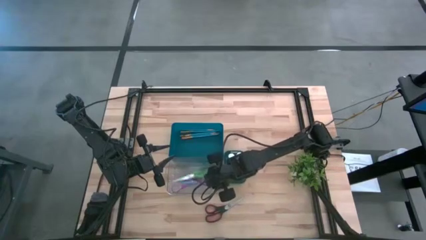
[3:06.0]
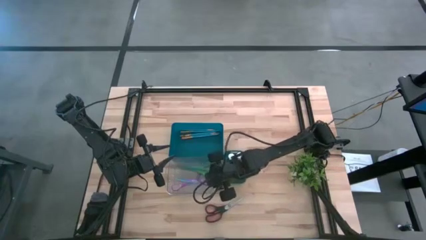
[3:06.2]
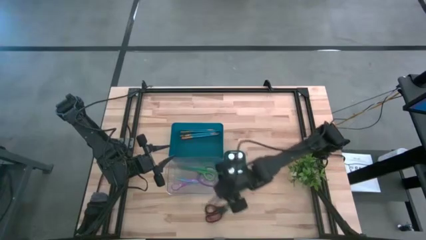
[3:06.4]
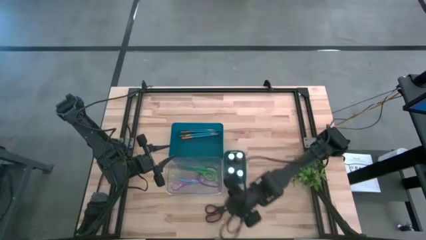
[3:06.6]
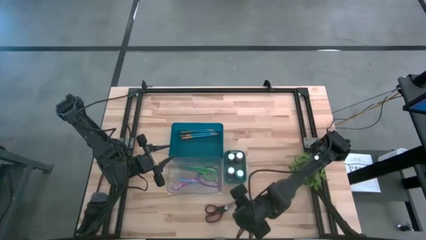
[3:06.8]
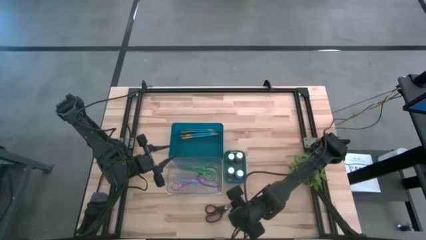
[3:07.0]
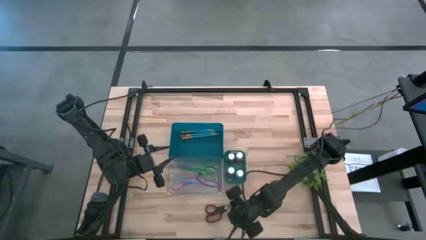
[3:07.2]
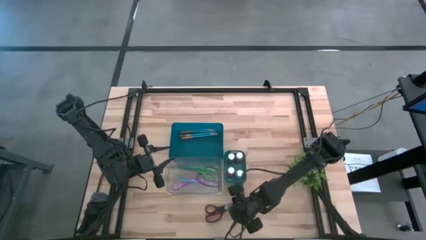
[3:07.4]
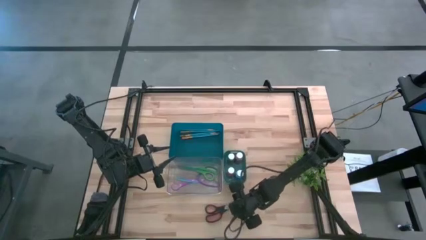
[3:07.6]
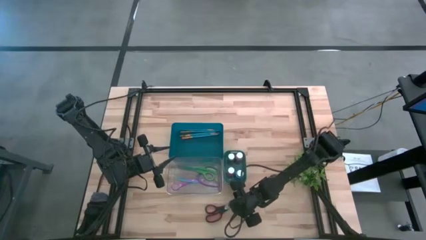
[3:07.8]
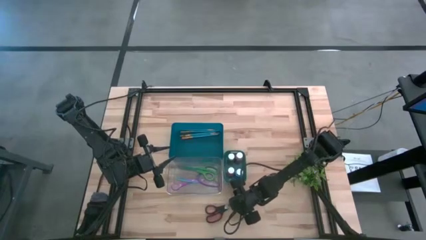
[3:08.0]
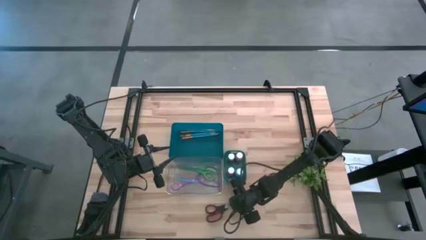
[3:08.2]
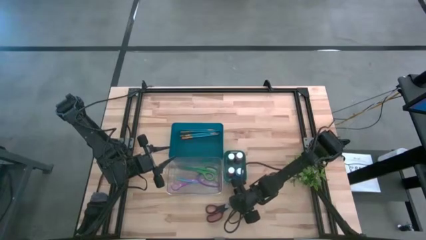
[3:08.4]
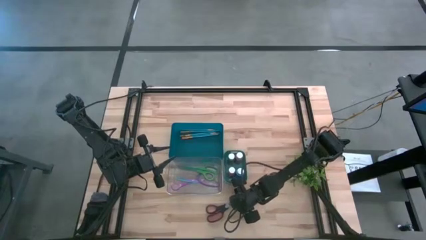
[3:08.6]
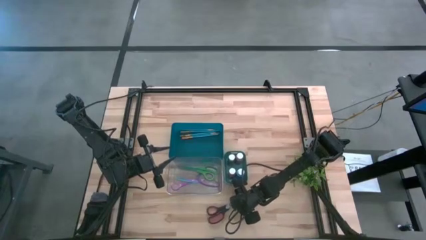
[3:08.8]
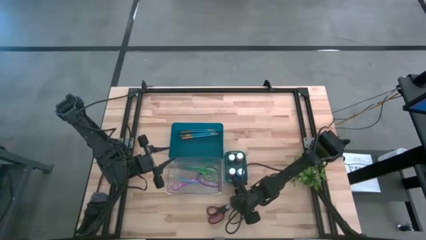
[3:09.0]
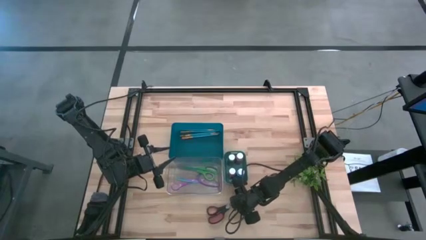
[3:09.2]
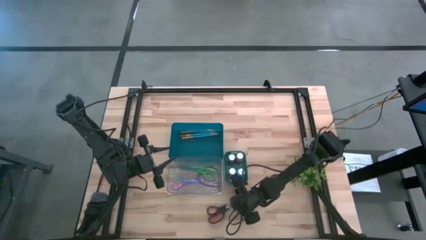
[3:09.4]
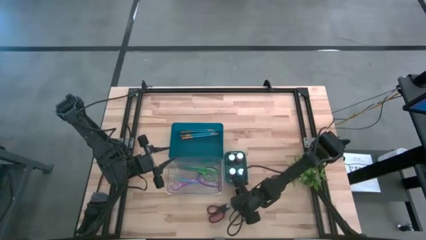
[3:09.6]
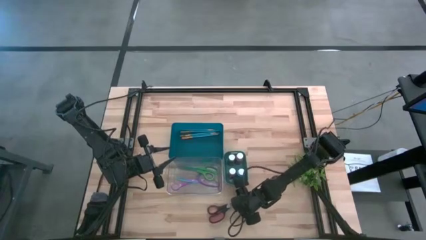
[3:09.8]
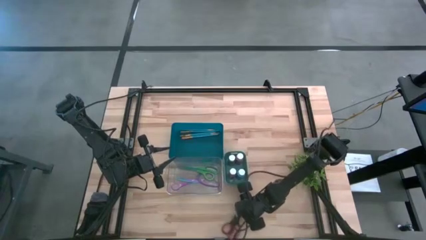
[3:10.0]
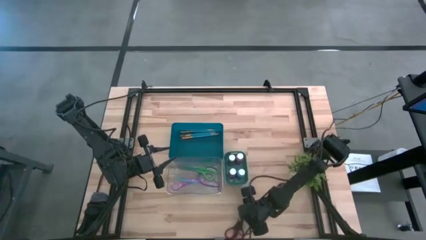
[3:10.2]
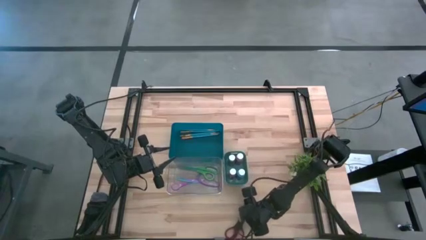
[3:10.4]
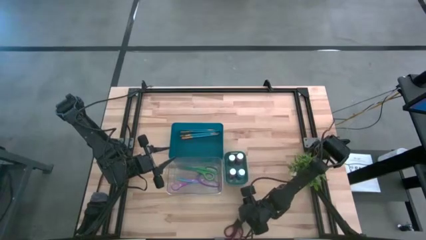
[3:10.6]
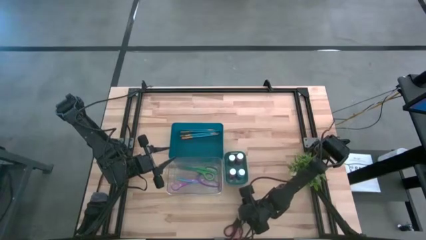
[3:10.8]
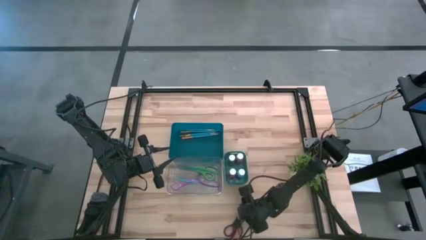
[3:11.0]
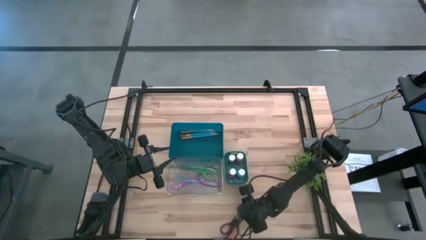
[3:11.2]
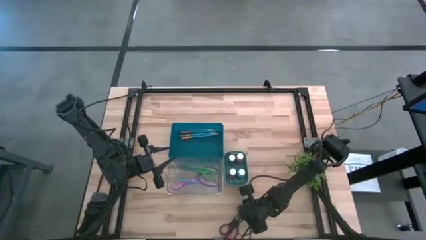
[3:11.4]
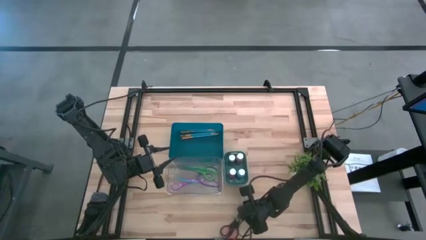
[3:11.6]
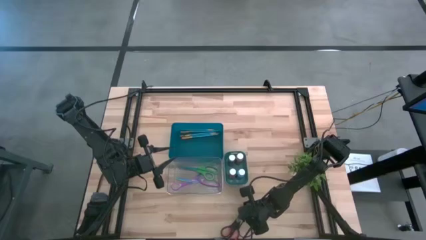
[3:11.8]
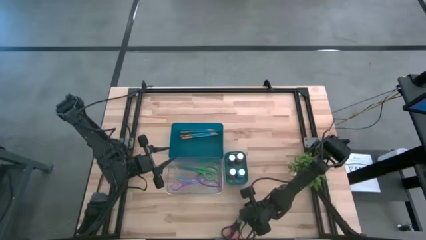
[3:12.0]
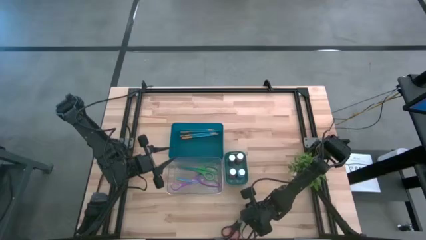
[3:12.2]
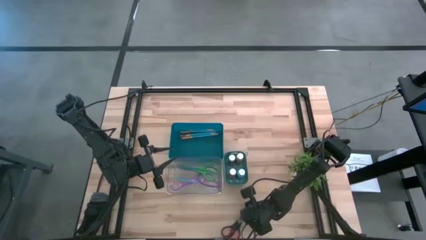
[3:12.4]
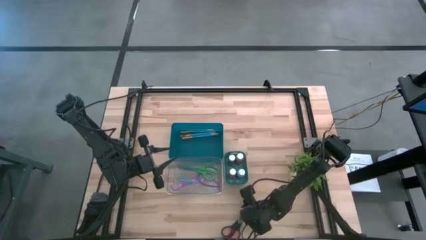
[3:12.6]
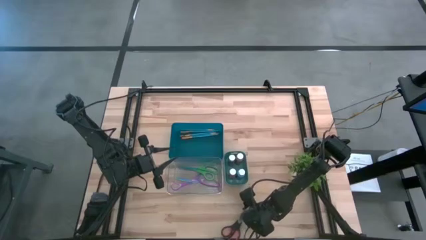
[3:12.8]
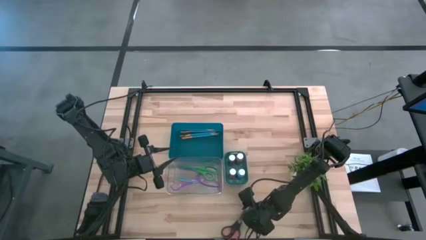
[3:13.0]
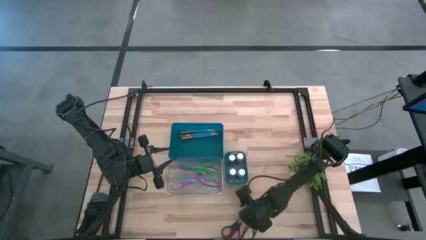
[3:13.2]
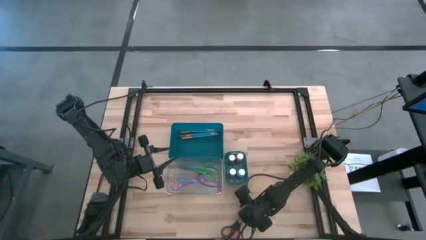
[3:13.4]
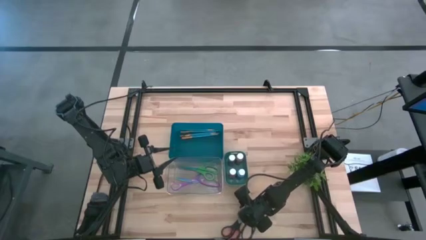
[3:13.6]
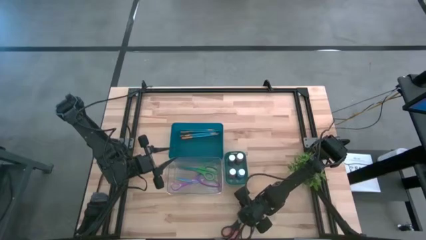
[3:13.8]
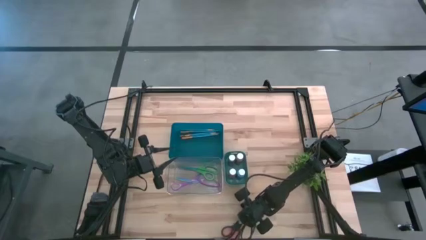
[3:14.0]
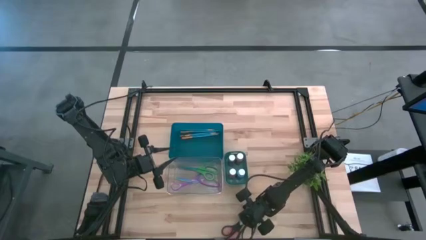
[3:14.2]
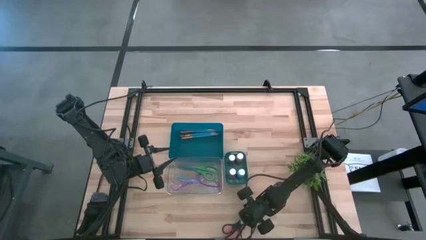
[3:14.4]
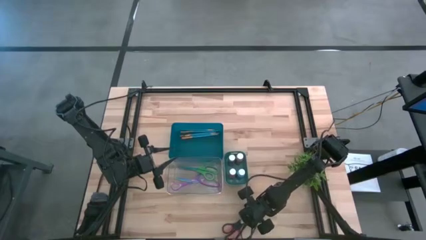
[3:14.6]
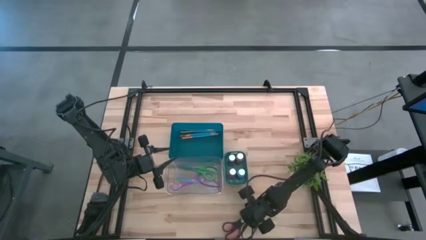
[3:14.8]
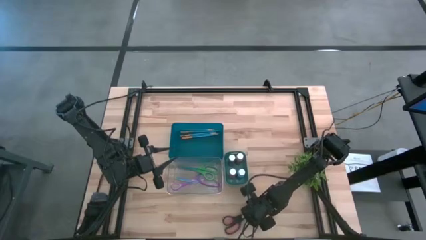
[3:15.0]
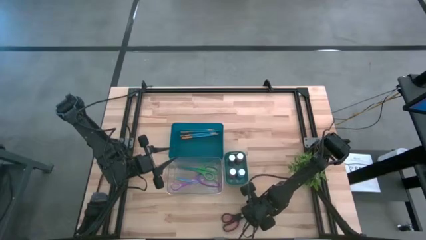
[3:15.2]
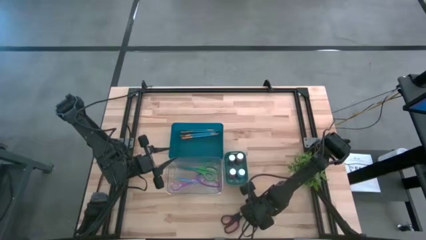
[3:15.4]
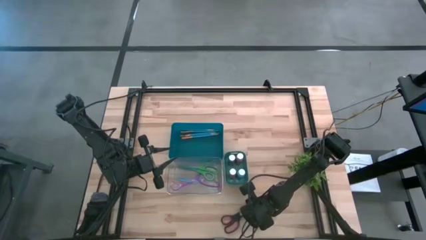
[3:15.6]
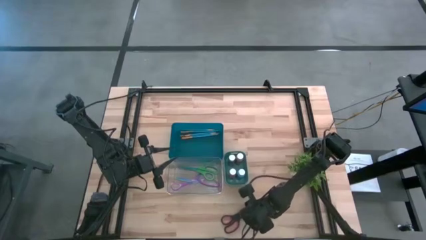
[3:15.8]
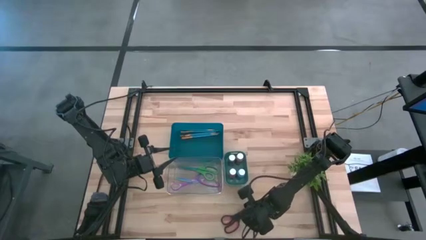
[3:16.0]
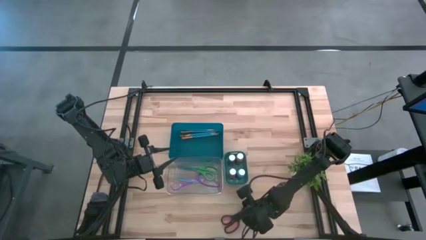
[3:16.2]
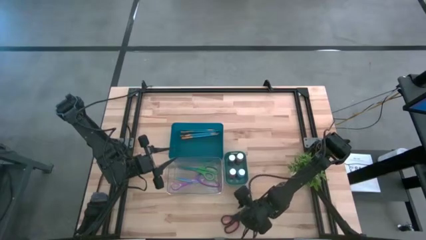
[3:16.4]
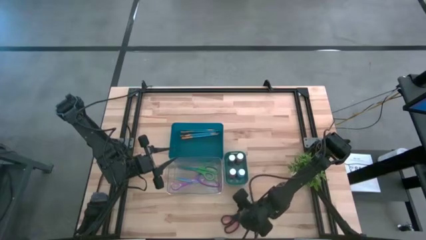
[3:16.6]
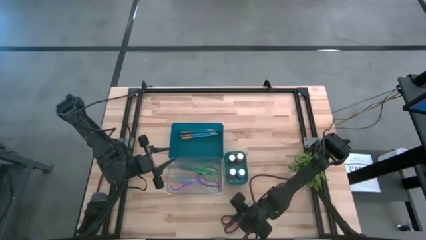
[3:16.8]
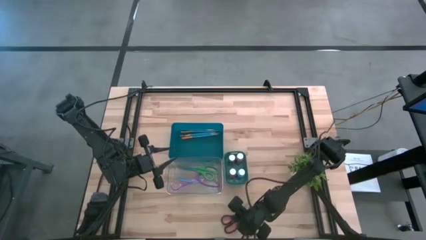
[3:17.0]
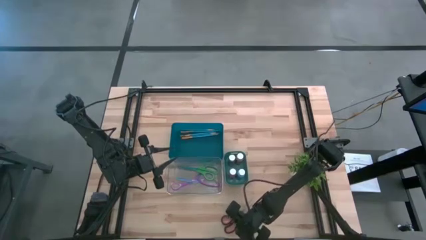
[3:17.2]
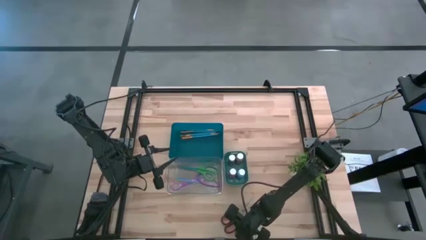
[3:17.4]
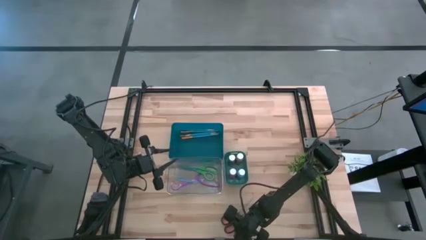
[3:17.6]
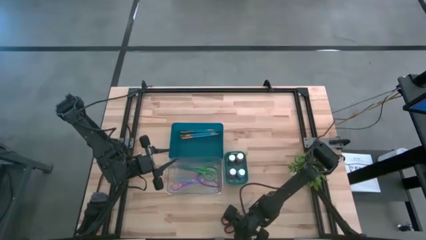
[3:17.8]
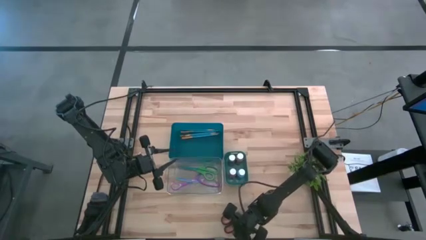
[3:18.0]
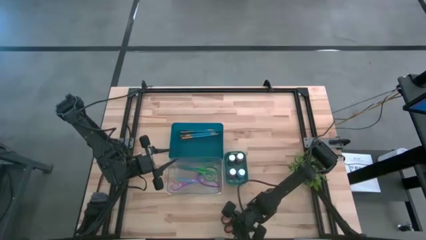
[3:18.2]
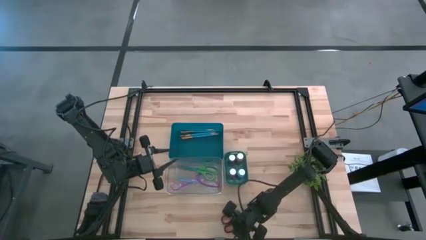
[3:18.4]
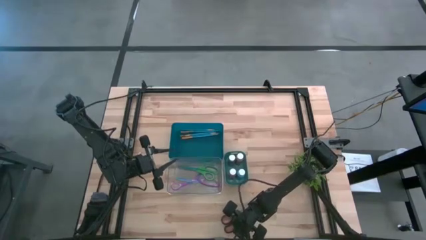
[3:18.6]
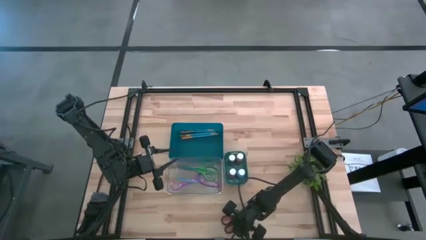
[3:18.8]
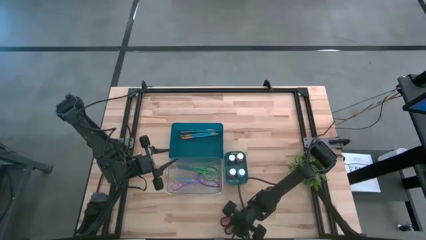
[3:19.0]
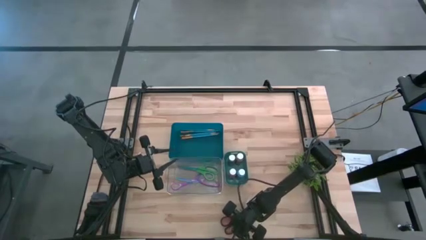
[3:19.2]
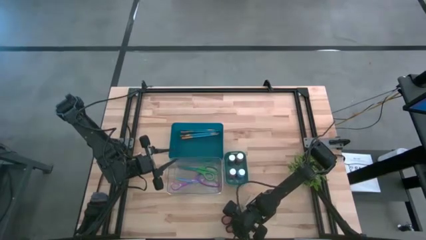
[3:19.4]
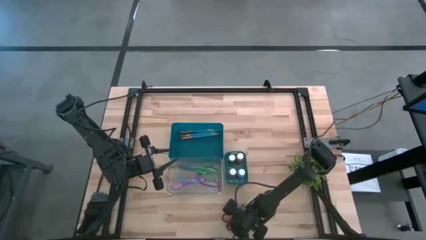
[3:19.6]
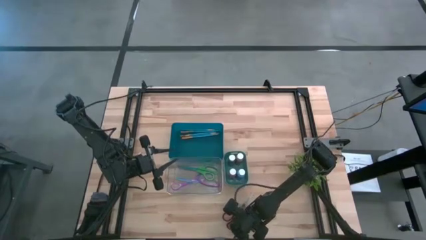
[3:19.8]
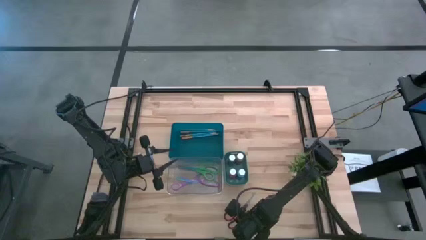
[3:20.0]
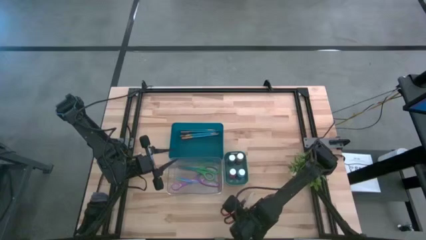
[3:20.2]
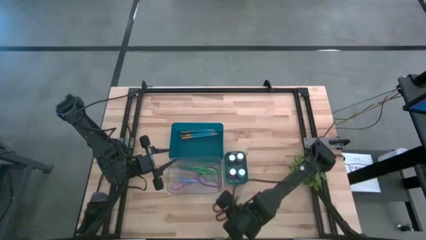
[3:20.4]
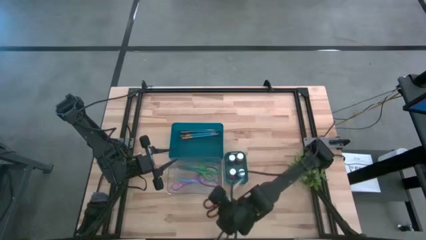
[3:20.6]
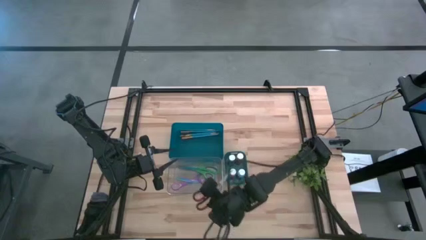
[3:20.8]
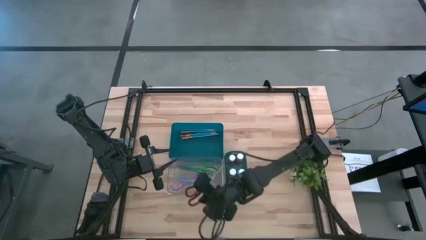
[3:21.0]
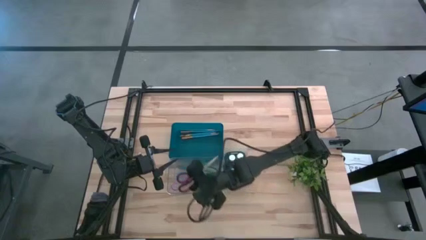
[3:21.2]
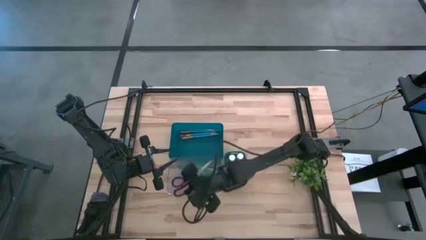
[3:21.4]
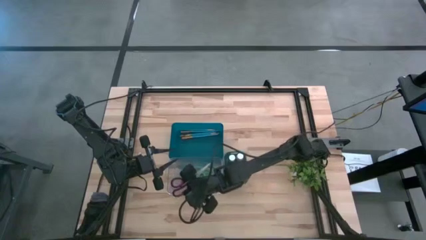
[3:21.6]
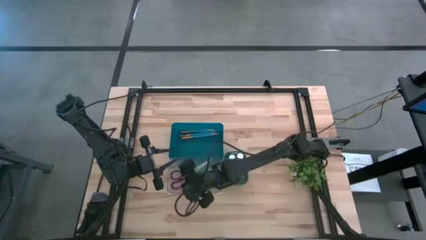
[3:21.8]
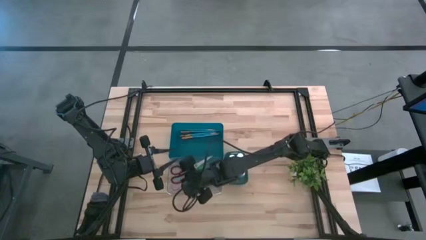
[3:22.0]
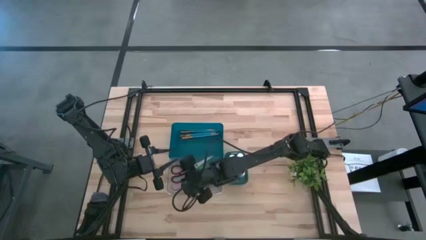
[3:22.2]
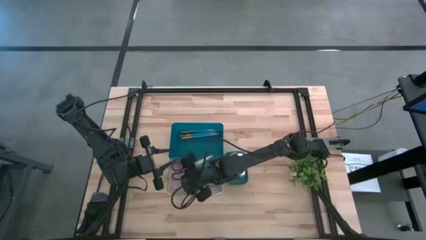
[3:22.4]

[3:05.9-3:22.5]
Task: Pick & Place Paint Supplies
Put the black scissors into the transparent bin
